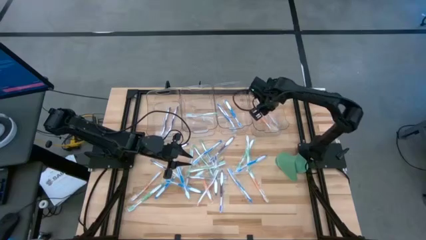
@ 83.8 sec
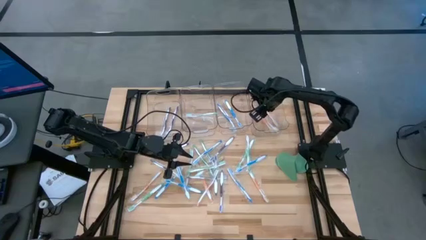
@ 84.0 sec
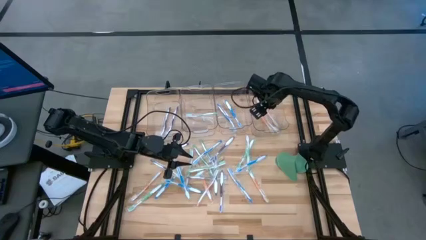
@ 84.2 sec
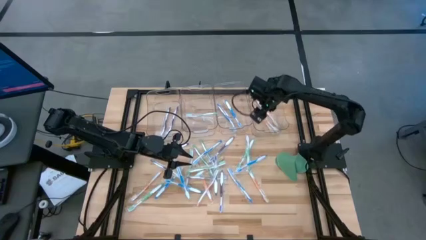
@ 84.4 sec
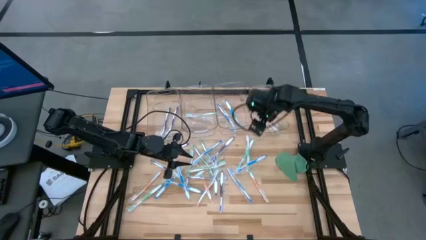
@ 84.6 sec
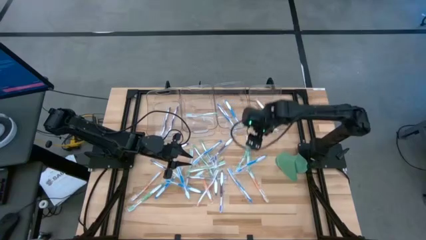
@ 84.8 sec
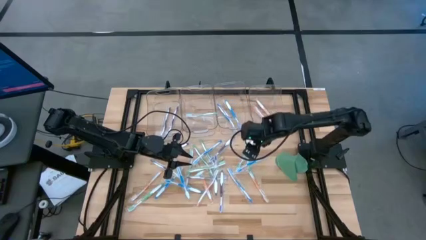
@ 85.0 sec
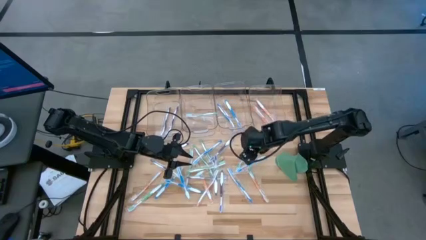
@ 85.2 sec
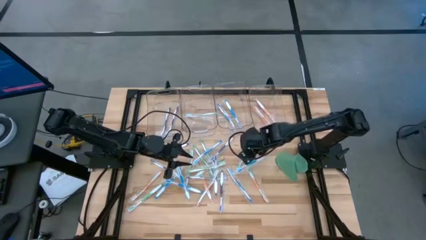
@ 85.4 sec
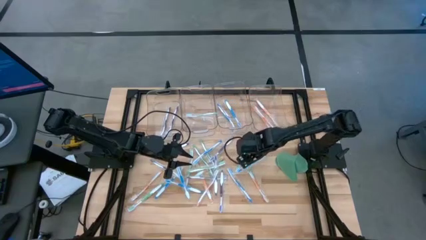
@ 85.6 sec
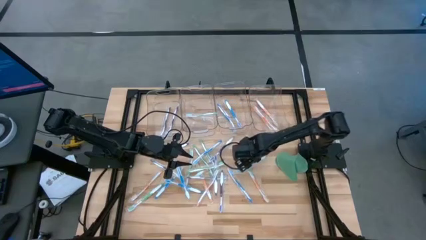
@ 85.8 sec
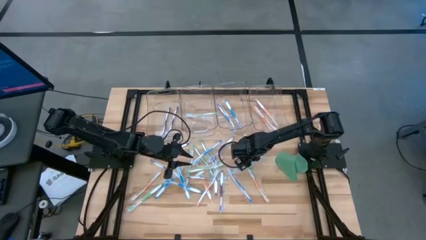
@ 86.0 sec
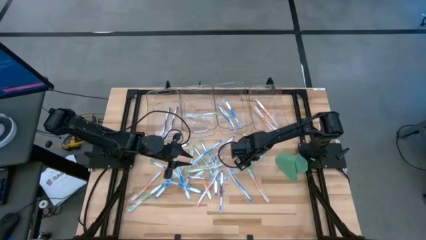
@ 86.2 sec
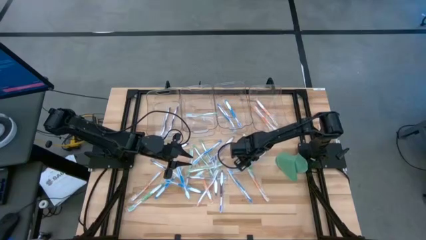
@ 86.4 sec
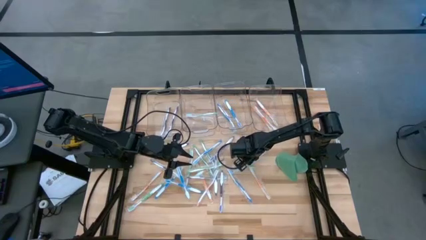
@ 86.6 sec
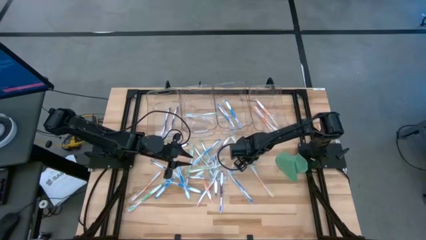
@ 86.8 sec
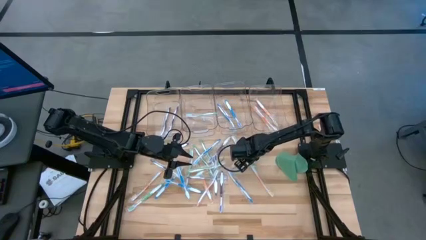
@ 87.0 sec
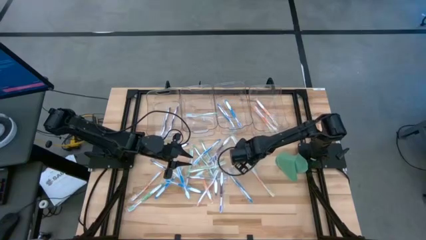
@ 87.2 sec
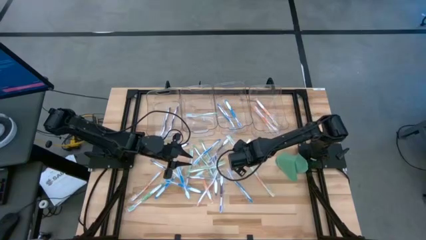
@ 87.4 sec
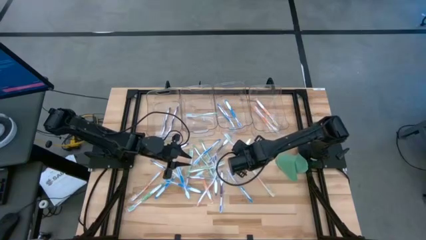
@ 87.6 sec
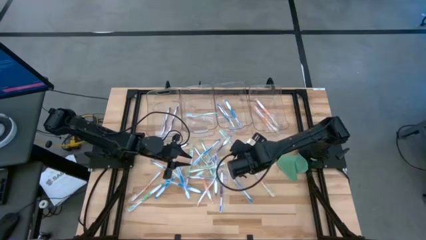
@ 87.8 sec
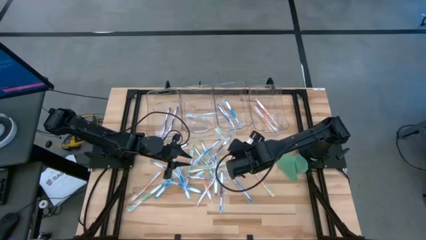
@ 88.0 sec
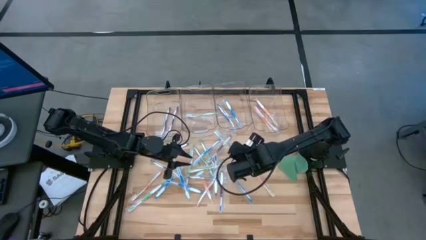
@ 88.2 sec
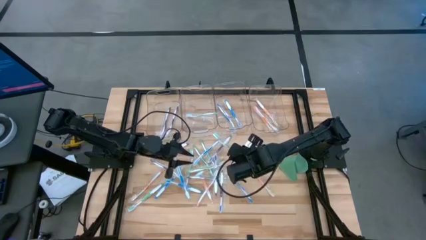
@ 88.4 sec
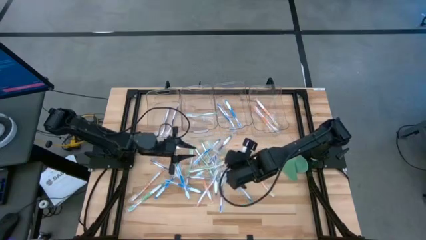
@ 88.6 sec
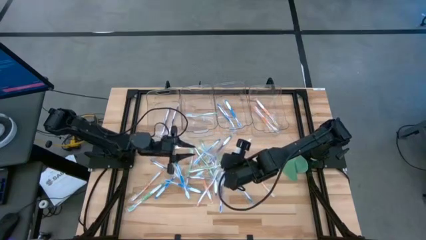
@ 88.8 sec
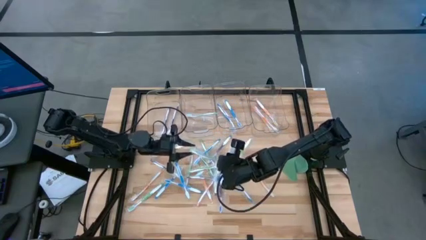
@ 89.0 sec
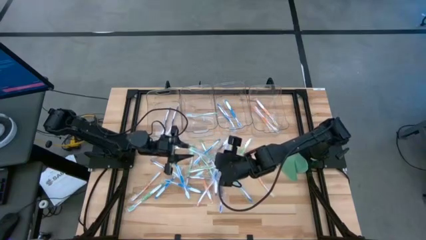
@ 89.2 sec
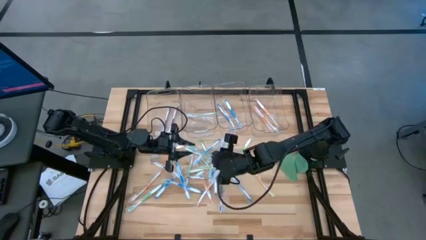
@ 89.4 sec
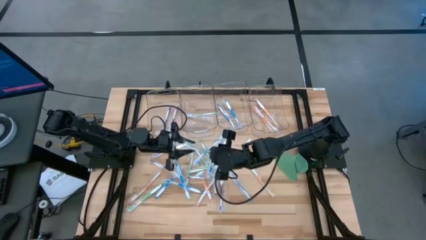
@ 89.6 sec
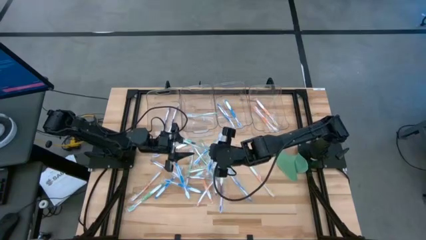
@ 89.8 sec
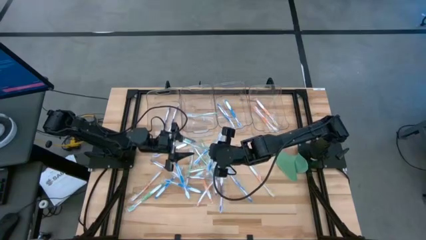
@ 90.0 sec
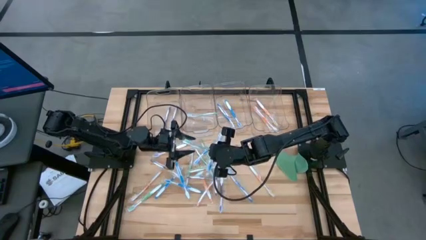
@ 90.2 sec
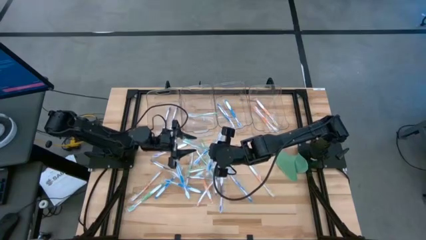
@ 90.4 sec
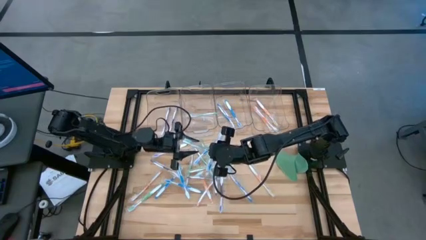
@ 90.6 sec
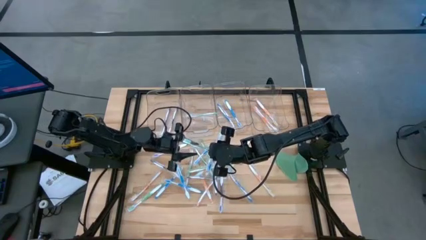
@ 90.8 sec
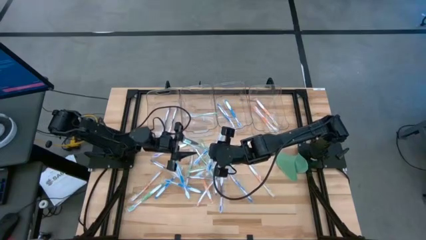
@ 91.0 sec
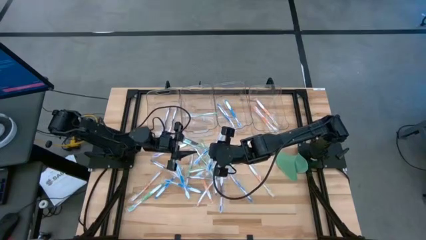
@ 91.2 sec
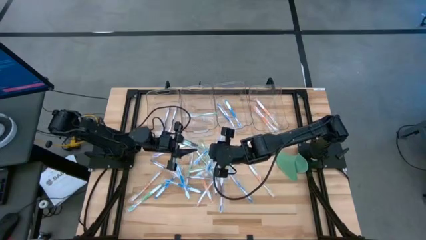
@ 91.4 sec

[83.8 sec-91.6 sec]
Task: Pick & Place Toothbrushes
Put the green toothbrush into the middle left transparent bin

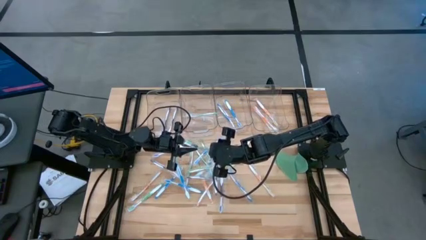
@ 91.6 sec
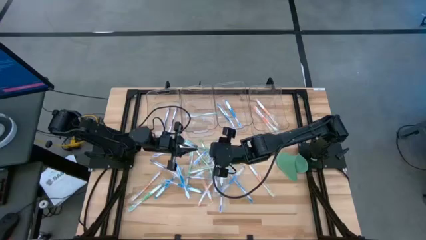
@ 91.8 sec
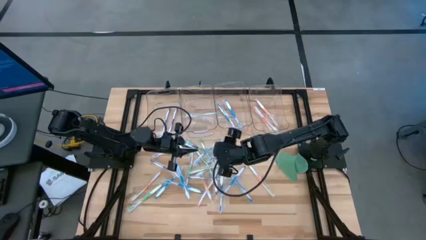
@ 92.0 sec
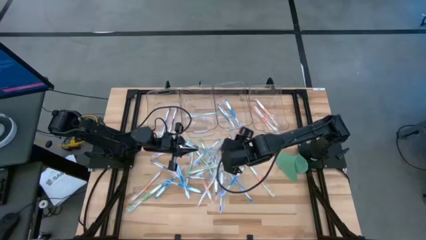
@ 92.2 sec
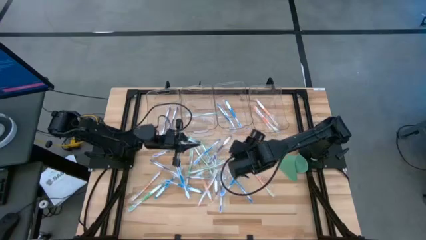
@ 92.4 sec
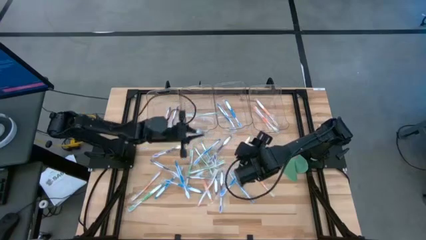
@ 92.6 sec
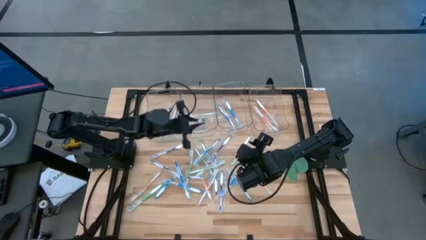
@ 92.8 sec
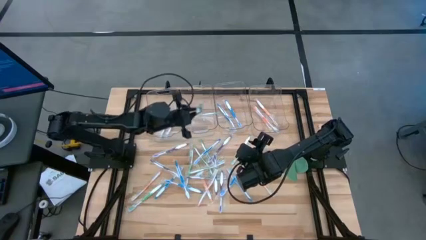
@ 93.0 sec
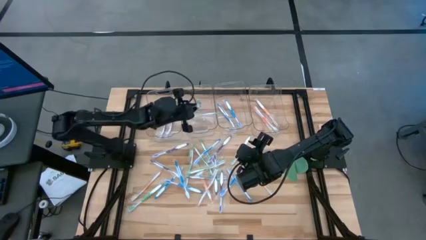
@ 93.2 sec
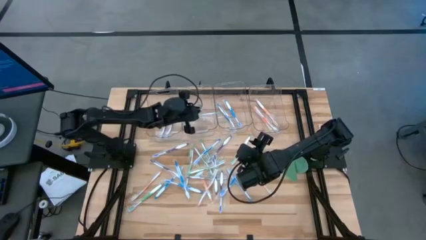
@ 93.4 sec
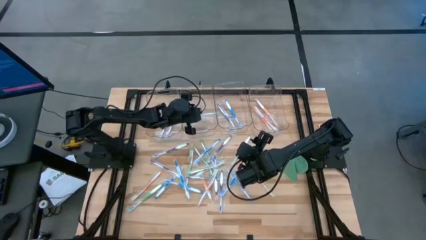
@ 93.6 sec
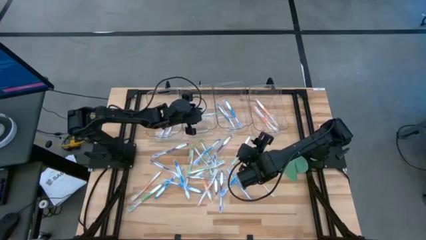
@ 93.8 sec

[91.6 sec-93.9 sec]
Put the green toothbrush into the middle left transparent bin

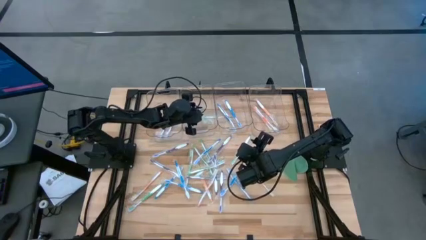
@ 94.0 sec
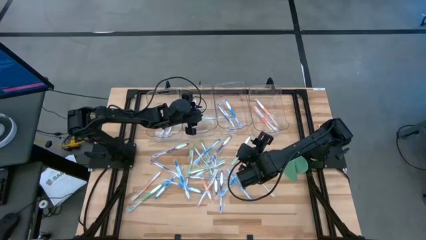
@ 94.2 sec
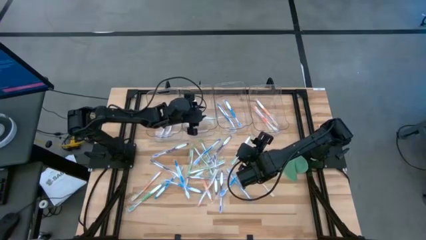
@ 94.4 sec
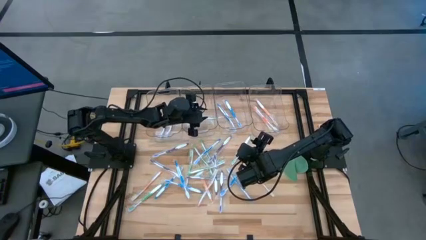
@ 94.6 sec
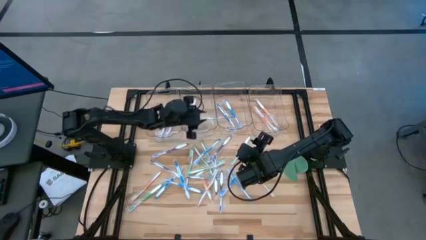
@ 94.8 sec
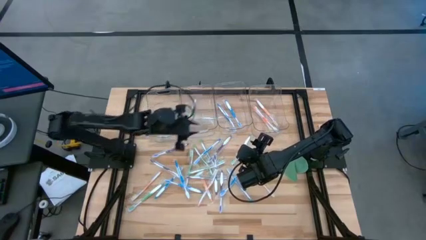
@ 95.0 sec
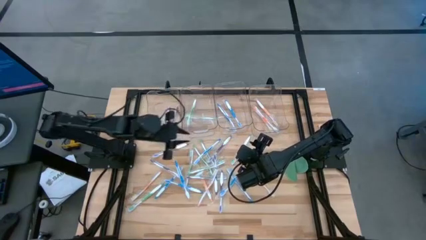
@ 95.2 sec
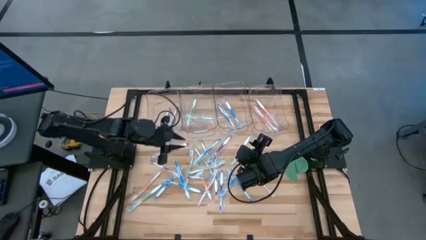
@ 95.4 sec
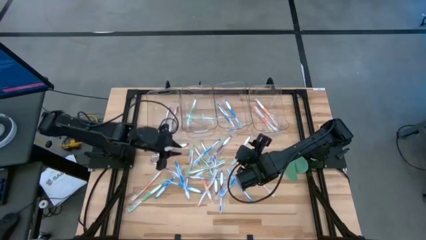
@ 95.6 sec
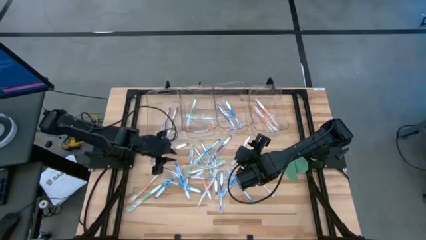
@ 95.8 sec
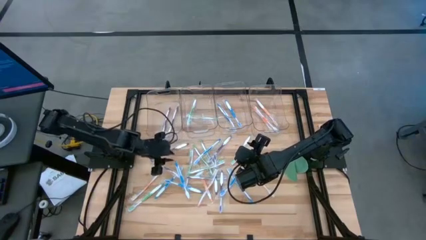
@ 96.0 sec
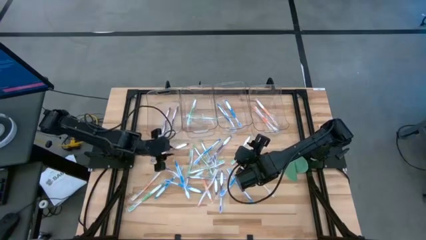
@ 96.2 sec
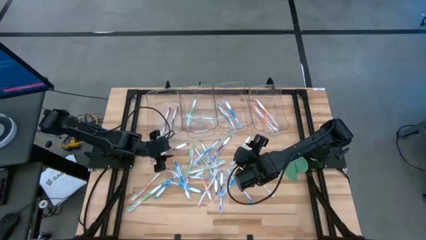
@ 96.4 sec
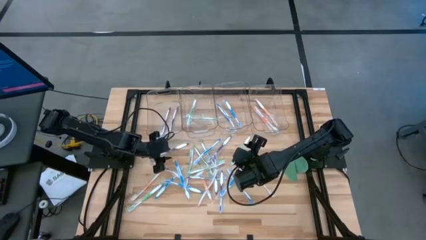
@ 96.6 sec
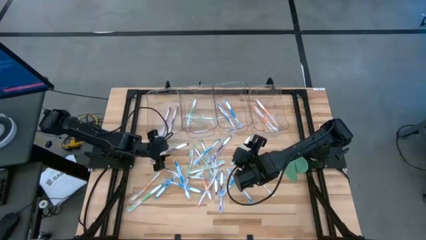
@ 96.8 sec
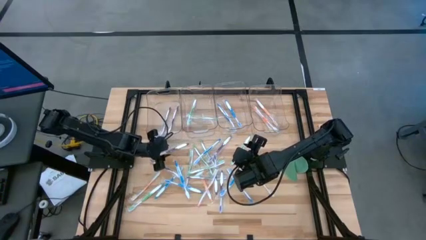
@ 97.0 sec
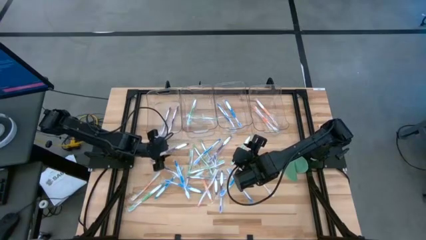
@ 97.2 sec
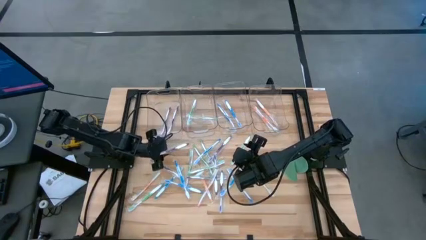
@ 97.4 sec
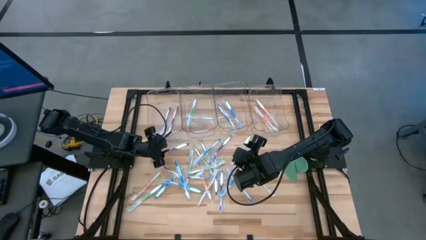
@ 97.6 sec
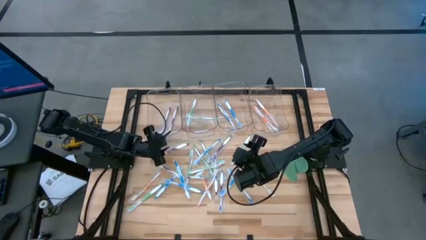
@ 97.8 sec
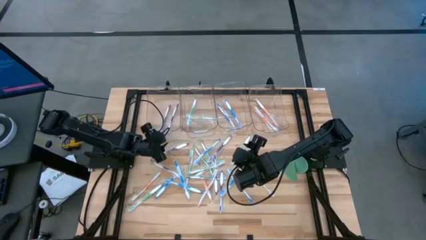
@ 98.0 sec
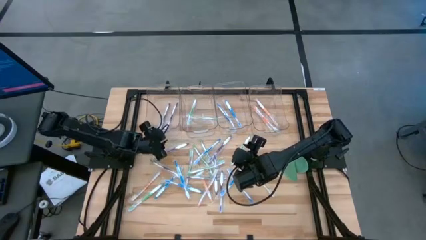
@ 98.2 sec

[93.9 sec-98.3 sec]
Adjust the left transparent bin

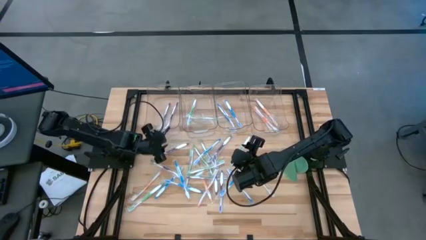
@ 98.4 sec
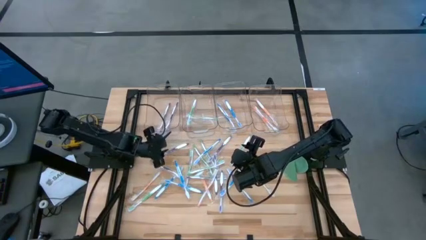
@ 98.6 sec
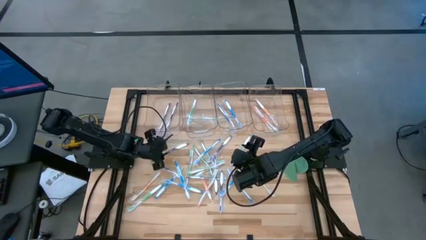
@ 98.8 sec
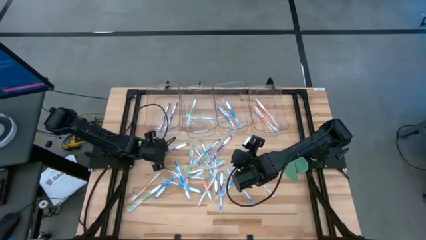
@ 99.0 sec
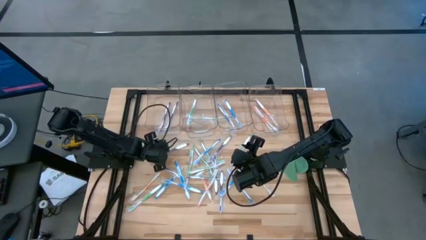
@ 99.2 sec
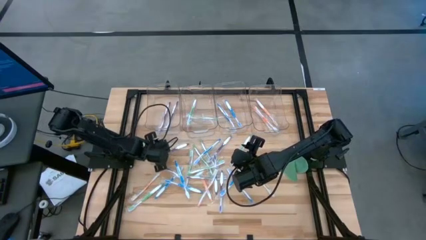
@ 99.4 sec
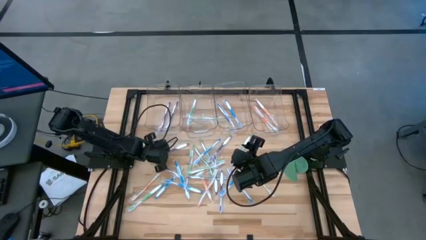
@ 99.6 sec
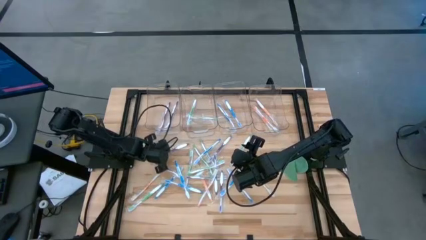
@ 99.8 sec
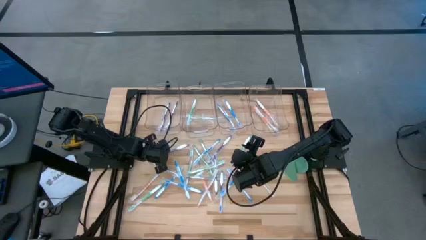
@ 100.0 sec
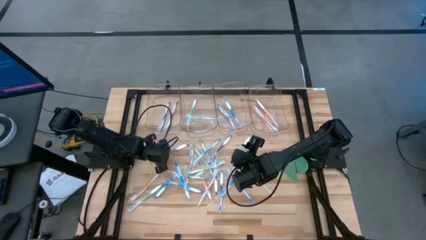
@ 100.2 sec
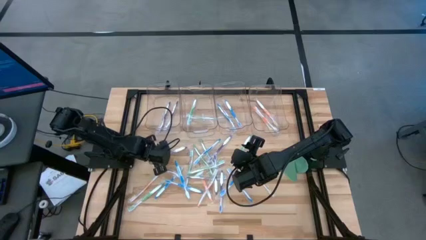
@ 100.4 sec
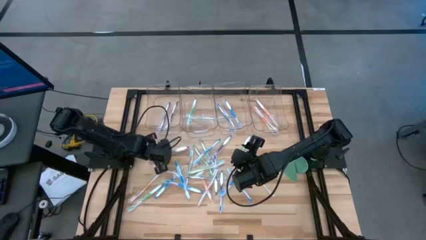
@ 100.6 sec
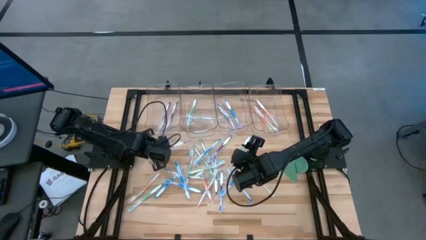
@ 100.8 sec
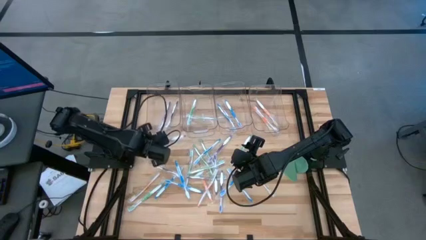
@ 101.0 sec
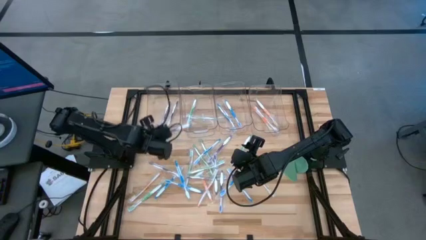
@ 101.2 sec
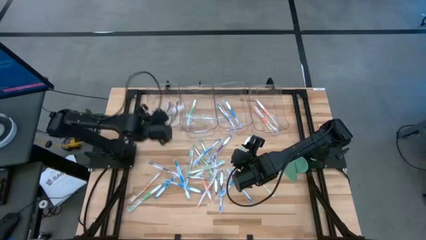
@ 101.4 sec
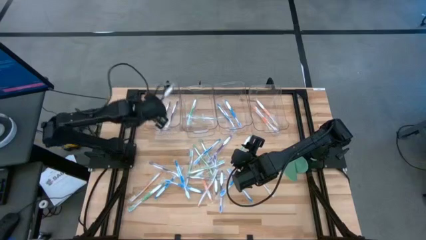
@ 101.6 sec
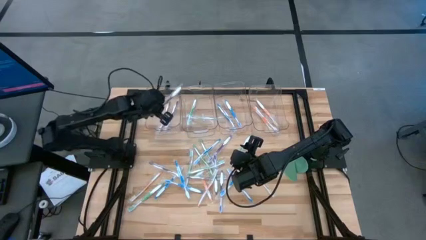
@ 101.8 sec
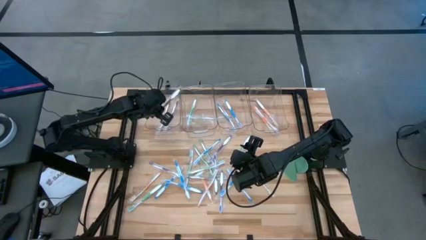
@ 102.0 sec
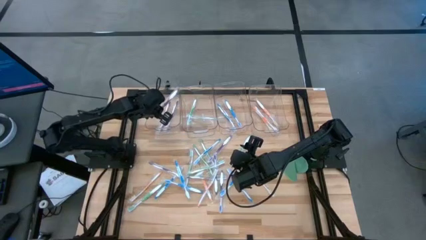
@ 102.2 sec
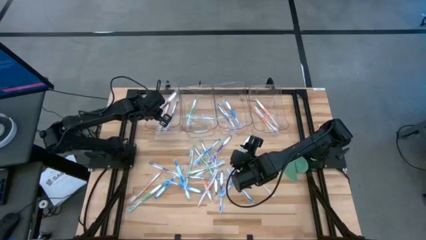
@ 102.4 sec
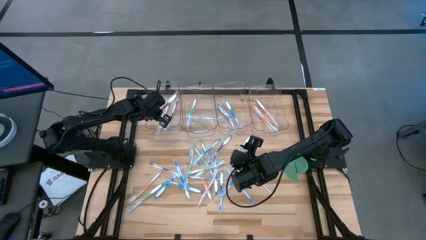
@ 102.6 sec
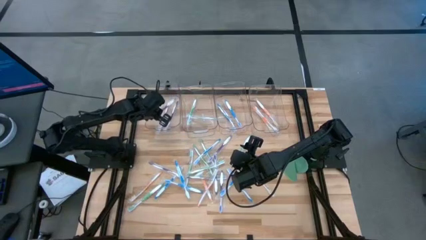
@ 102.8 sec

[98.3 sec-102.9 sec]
Put the purple toothbrush into the left transparent bin
